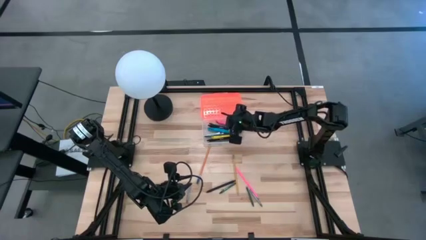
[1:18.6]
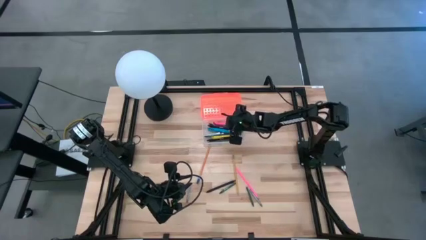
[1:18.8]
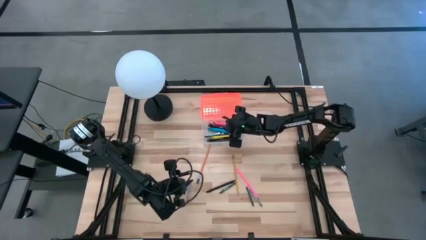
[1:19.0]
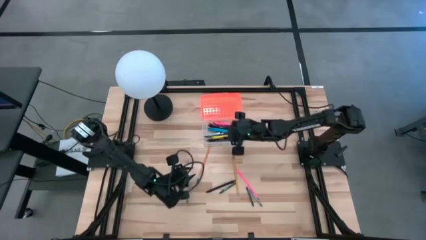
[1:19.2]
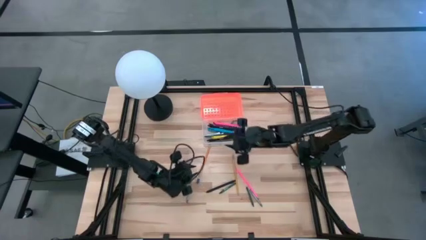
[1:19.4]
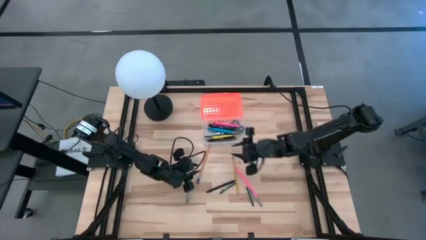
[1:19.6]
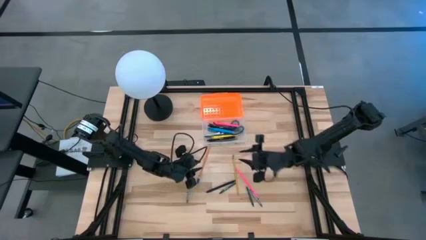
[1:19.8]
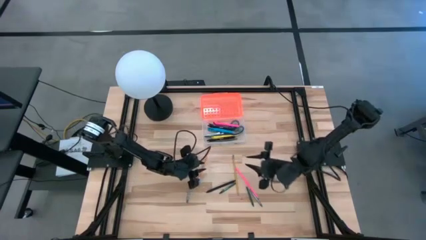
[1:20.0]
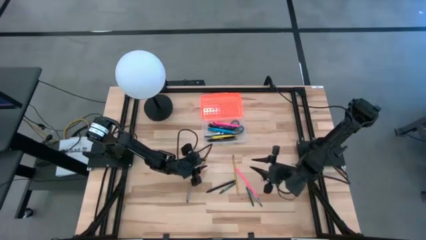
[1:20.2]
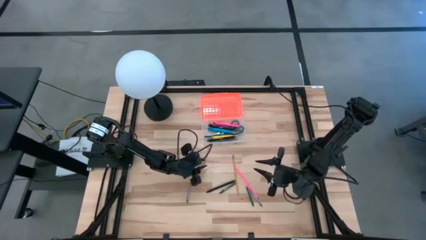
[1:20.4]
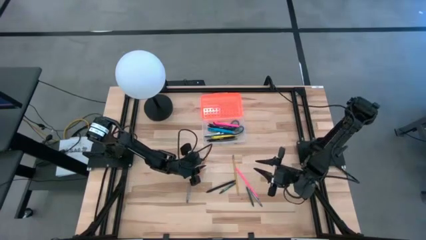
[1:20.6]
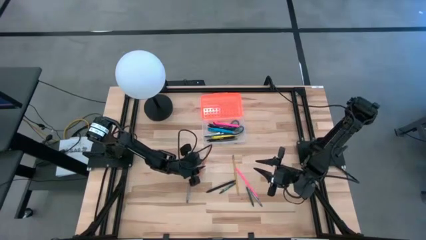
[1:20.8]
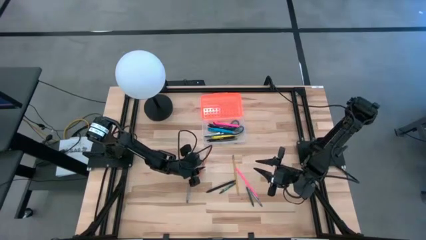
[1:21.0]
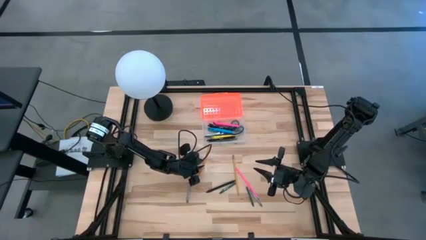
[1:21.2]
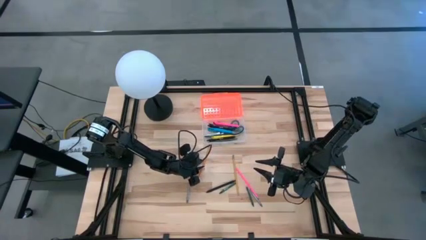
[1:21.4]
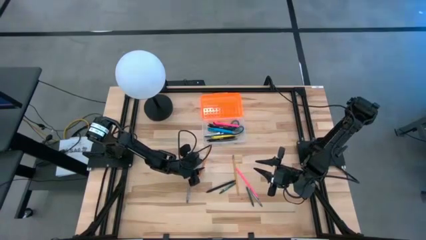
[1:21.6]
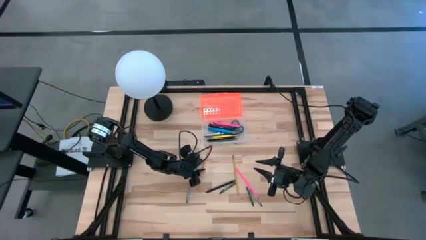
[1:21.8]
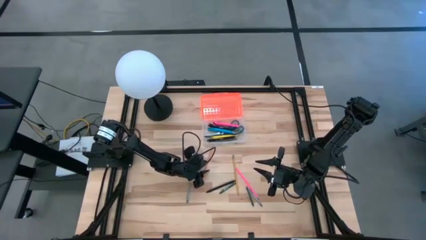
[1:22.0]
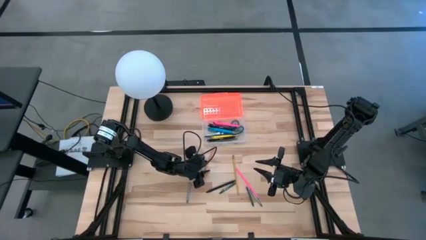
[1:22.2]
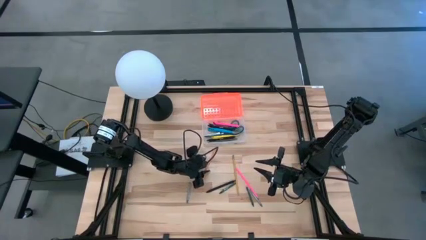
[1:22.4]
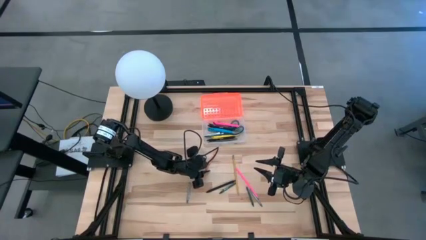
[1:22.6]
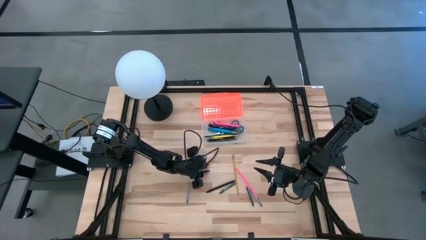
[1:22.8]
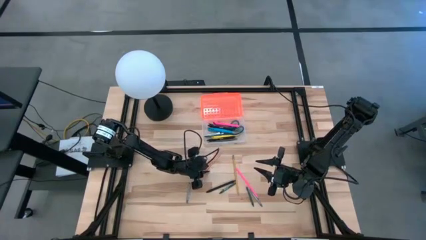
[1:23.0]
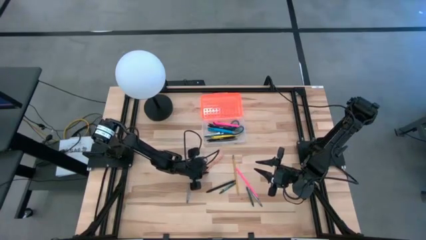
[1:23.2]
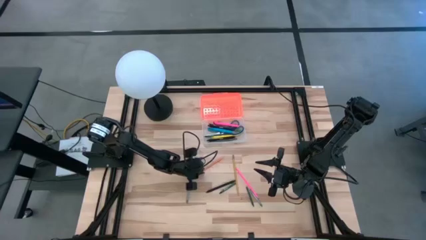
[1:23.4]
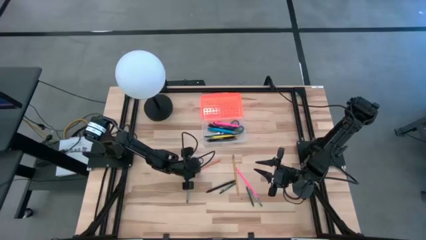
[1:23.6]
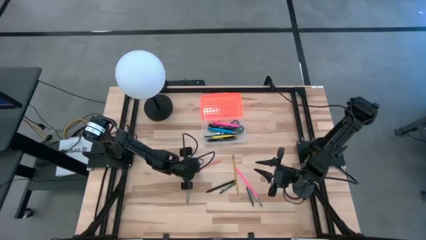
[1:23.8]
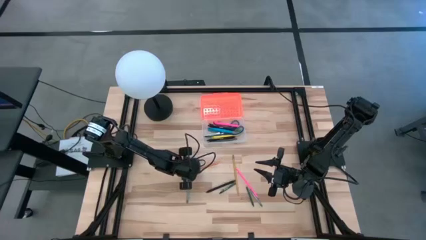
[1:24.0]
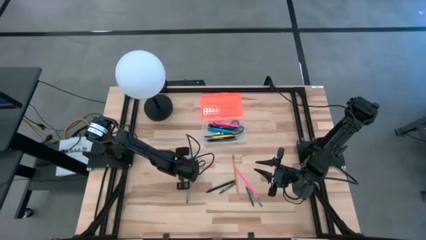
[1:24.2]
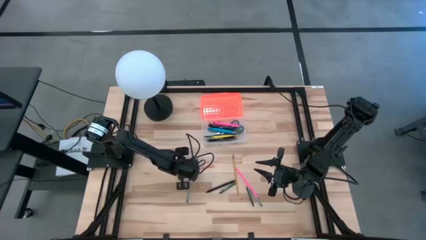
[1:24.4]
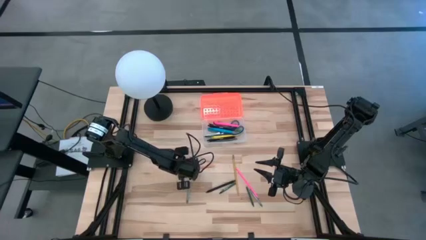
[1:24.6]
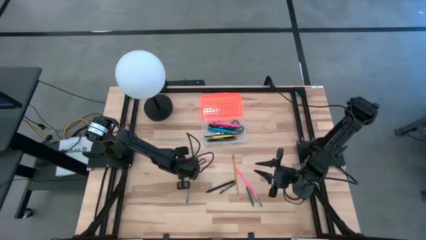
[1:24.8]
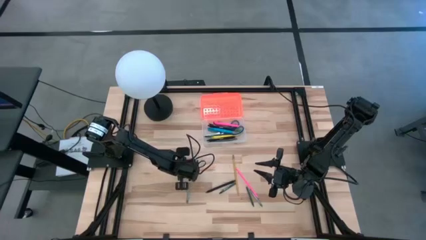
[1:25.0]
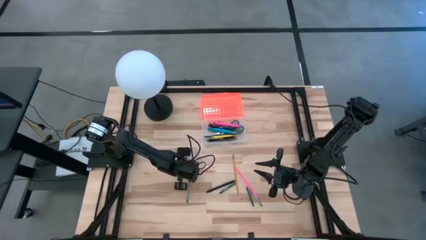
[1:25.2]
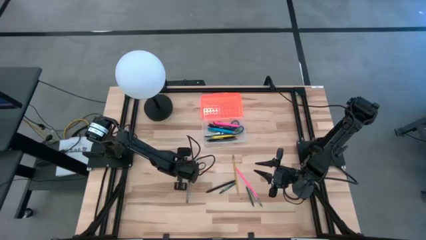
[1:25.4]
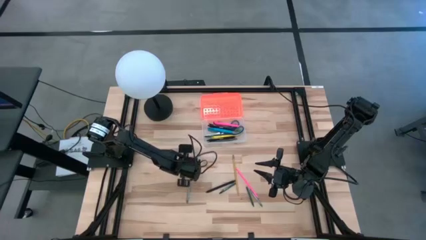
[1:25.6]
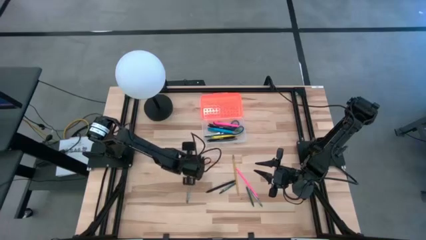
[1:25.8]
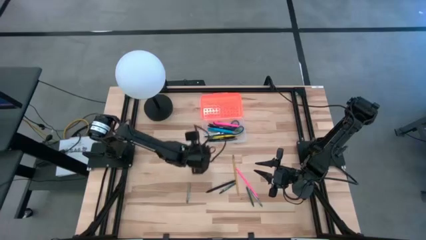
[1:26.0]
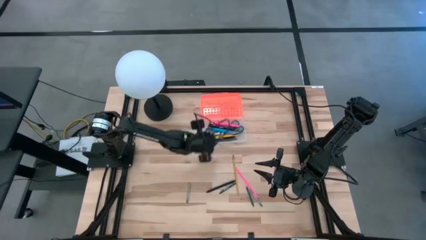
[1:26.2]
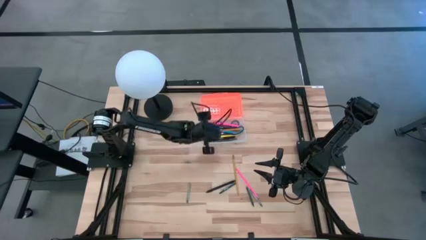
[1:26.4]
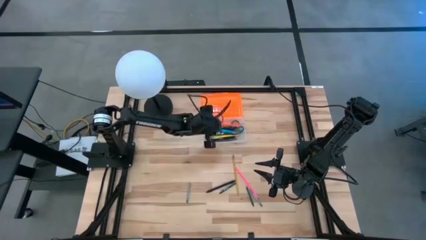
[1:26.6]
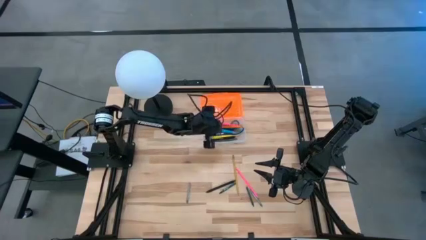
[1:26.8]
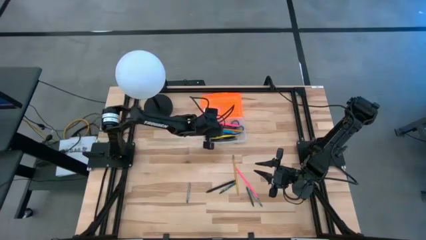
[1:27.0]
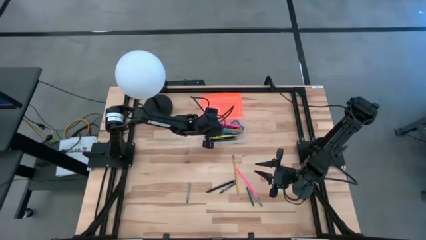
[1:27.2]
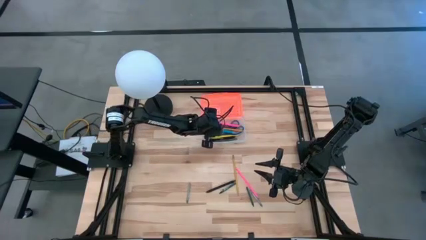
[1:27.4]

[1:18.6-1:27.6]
Task: Pick & place school supplies into a supply box
Put the yellow pencil into the orange supply box

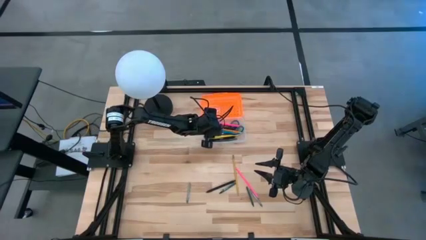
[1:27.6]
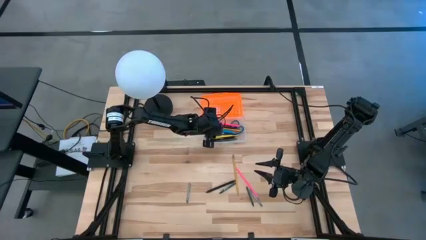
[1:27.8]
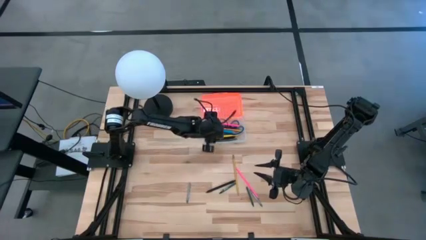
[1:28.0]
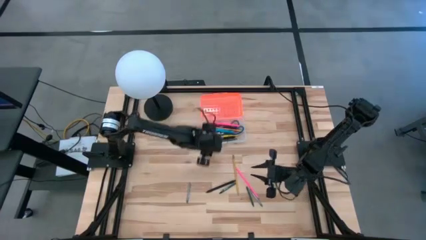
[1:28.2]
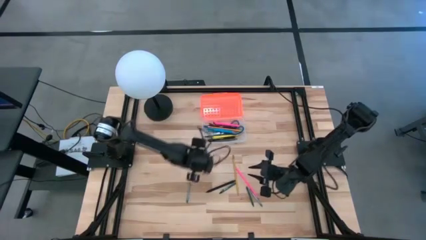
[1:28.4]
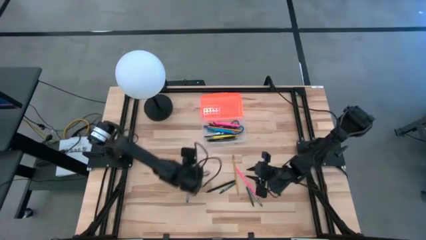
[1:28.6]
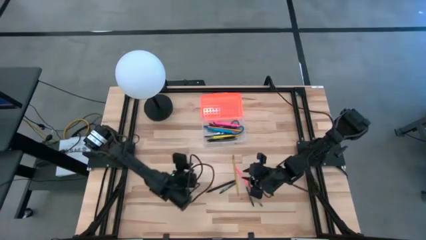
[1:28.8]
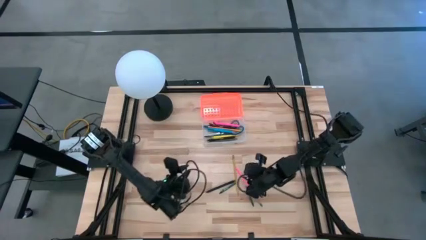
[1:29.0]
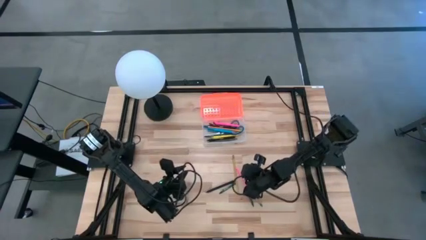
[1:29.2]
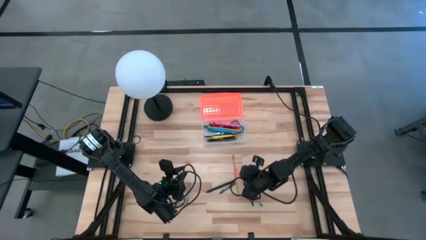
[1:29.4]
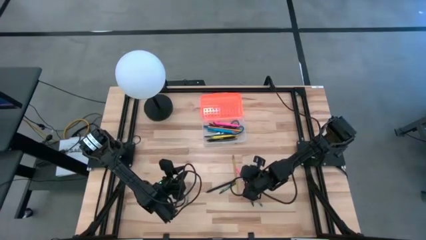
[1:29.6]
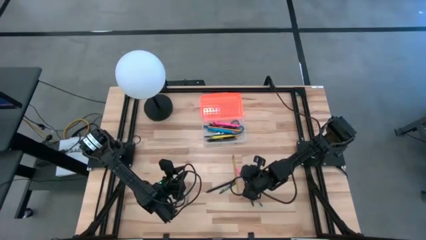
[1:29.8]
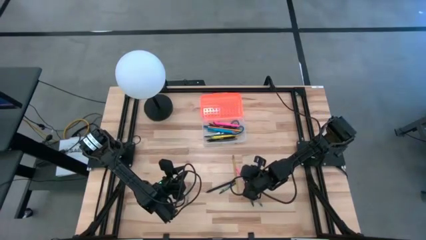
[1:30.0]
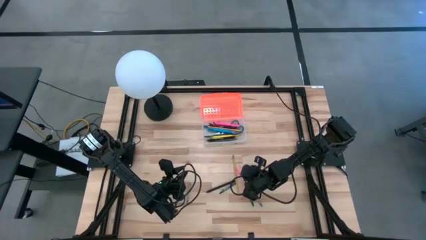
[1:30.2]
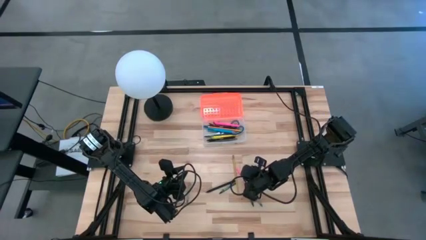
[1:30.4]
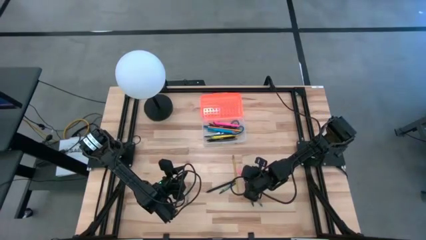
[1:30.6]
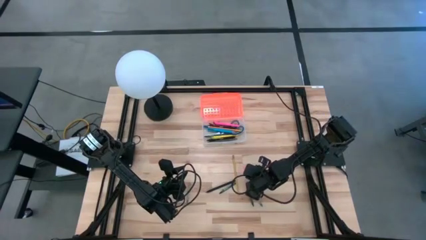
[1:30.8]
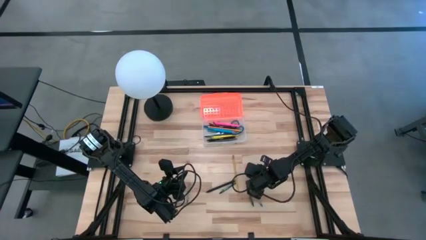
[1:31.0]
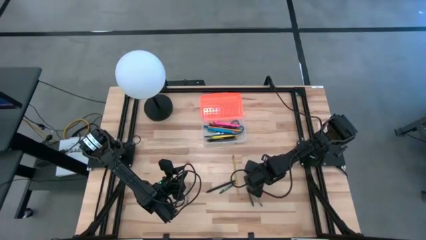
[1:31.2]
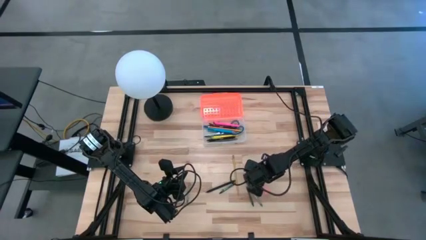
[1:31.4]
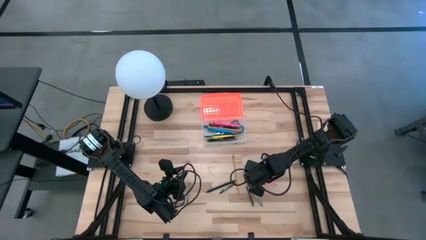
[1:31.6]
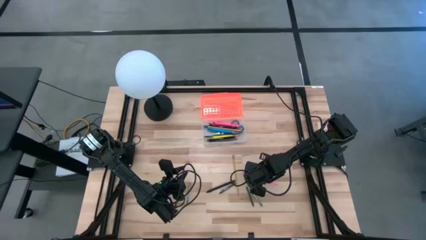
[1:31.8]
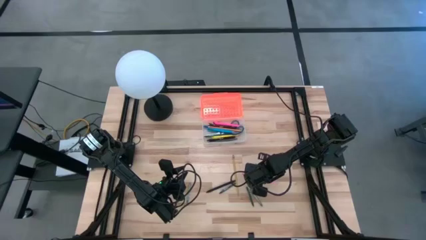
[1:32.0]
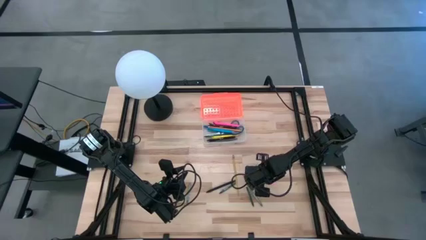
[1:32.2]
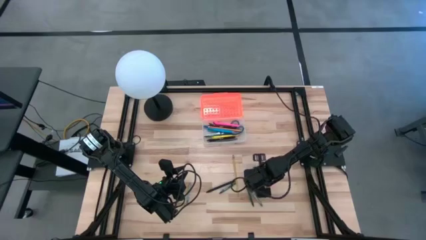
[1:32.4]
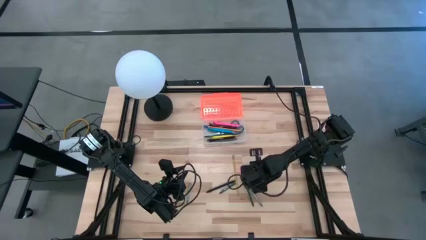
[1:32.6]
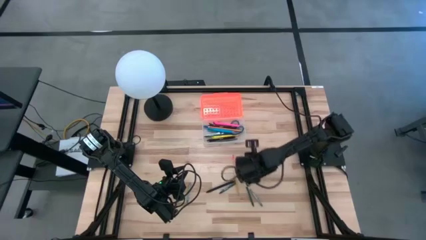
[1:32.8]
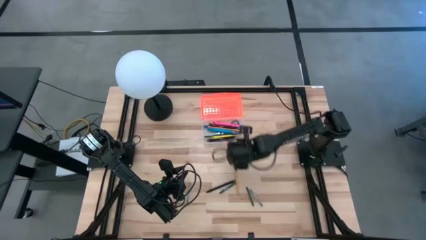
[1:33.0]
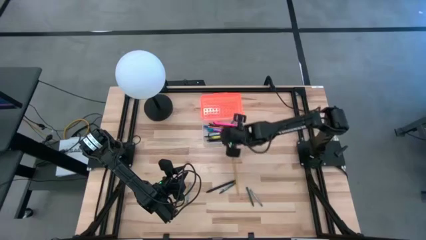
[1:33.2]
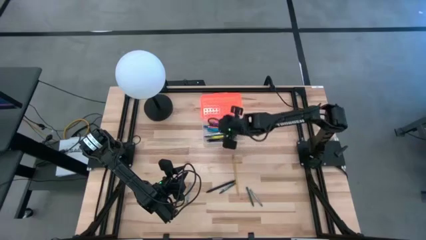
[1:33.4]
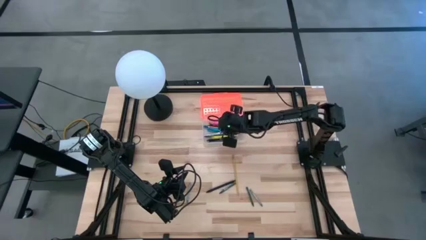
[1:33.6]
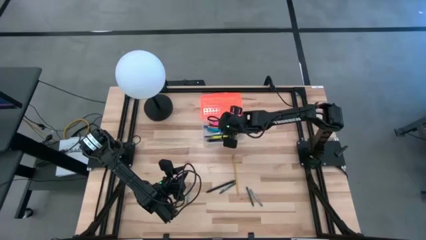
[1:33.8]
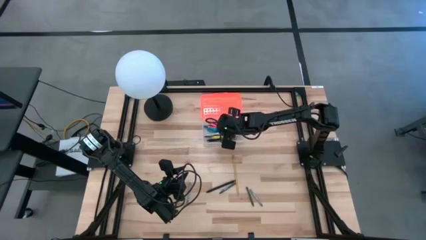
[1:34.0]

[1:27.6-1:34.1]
Put the pink pencil into the orange supply box

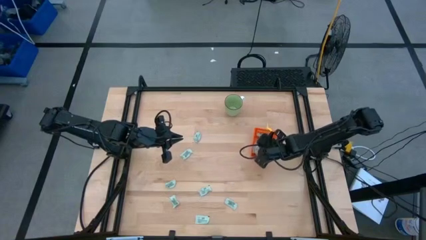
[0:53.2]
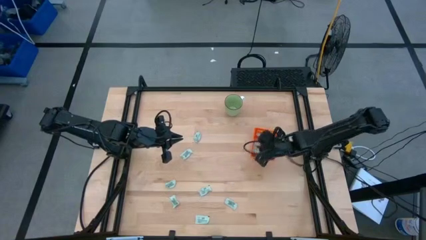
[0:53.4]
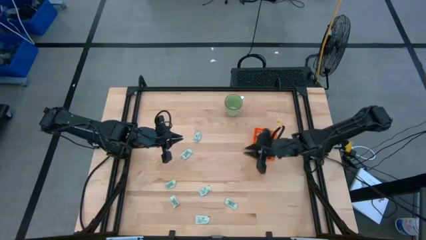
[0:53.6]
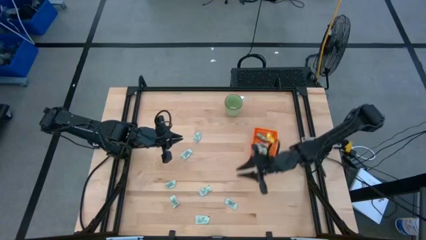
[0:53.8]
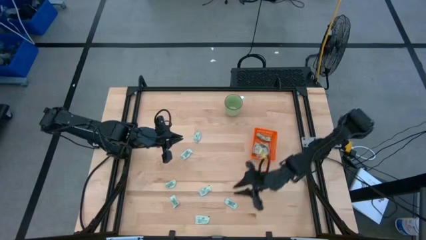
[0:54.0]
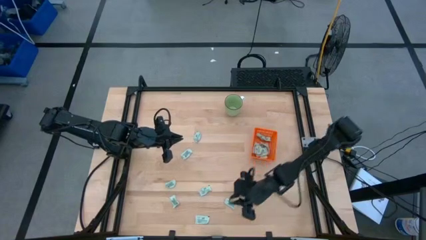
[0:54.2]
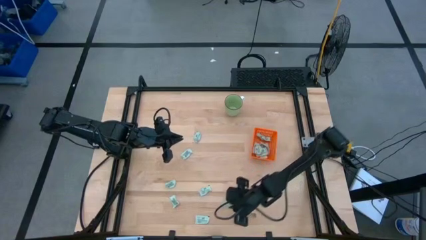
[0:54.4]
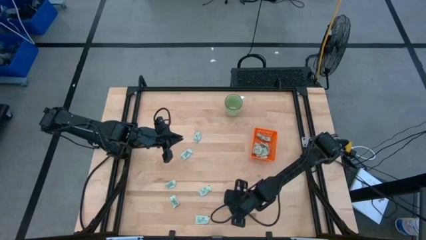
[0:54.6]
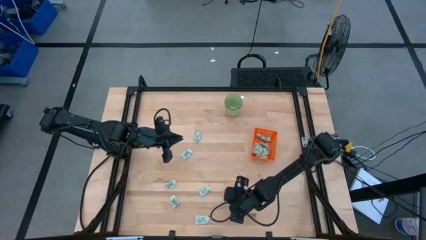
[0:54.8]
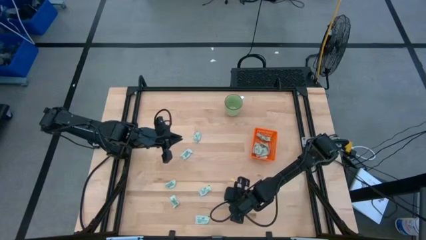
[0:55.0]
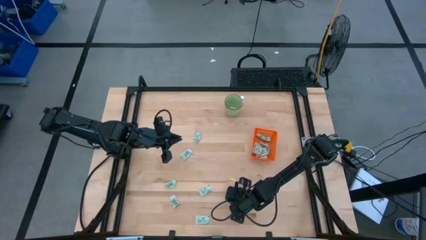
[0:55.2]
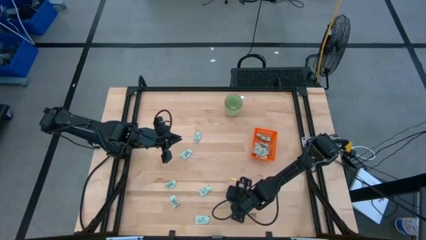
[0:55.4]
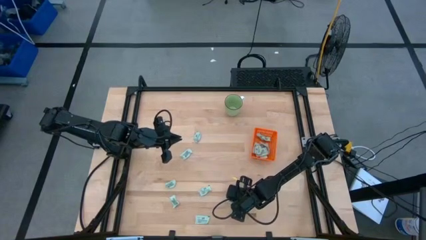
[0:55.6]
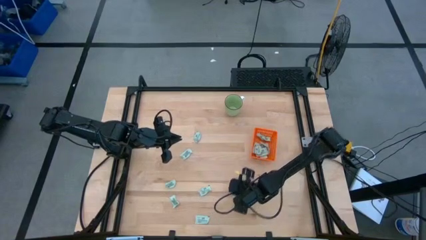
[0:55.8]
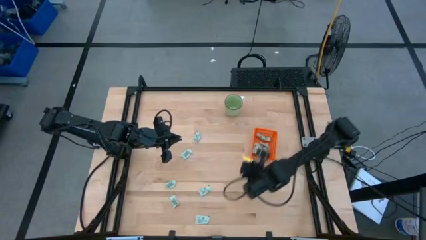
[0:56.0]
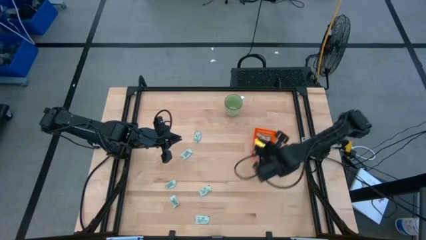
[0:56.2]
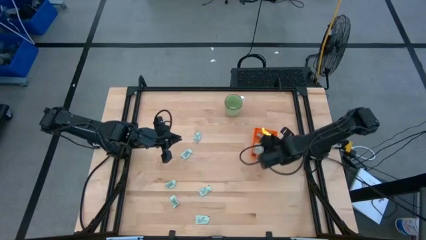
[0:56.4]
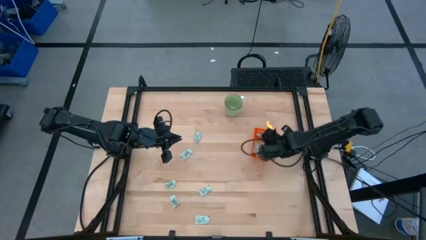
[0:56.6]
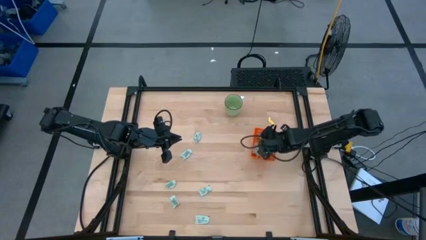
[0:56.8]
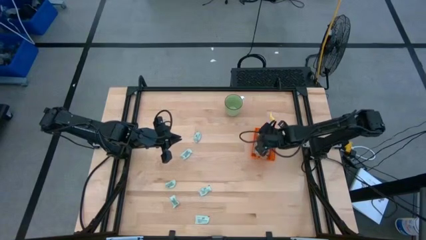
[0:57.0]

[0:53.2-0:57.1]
Task: Pick and place Stevia / Truvia into bins
Put the light green packet into the orange basket
